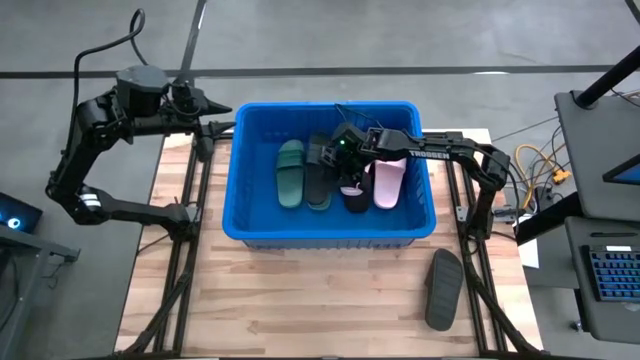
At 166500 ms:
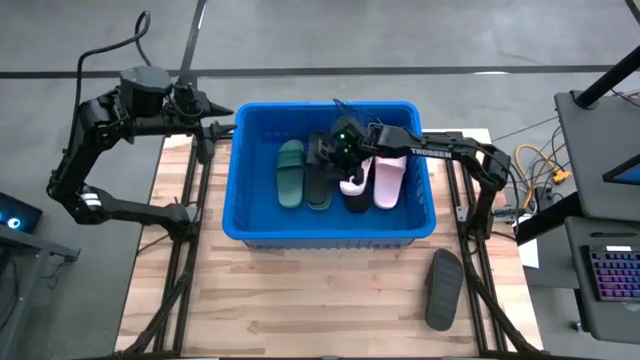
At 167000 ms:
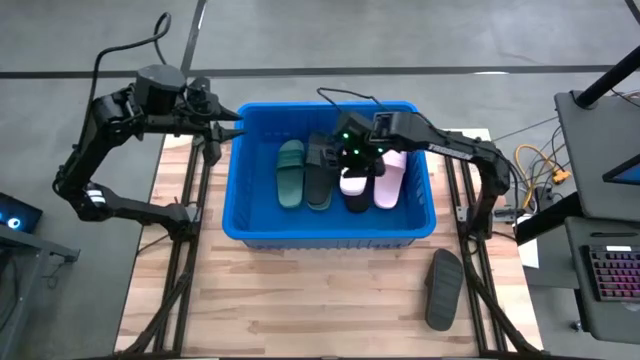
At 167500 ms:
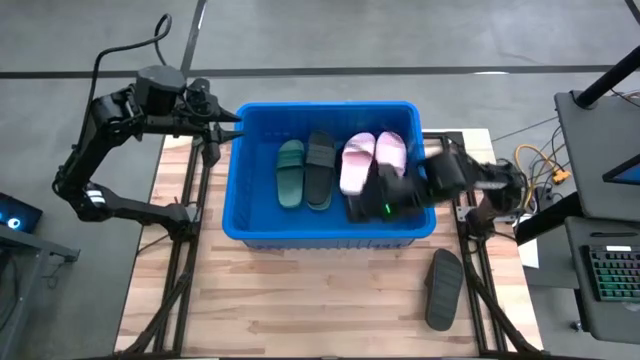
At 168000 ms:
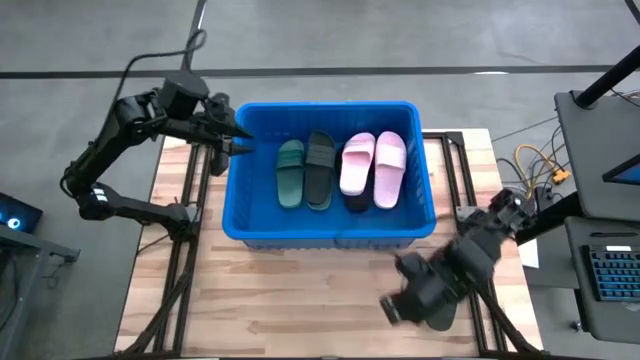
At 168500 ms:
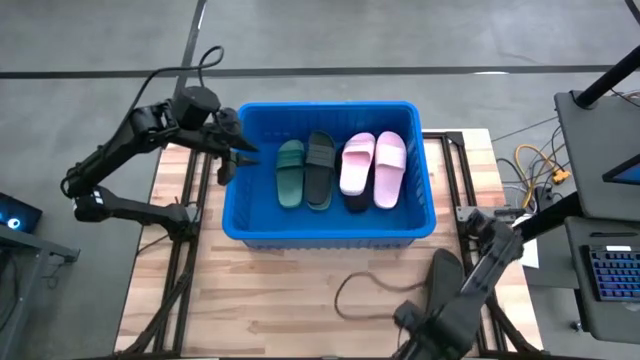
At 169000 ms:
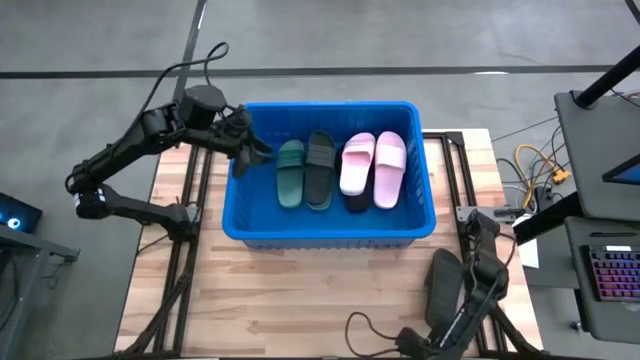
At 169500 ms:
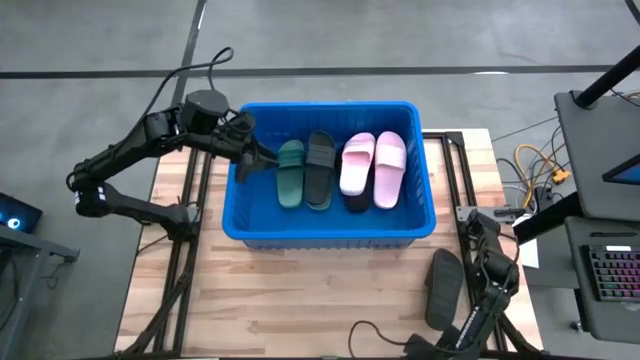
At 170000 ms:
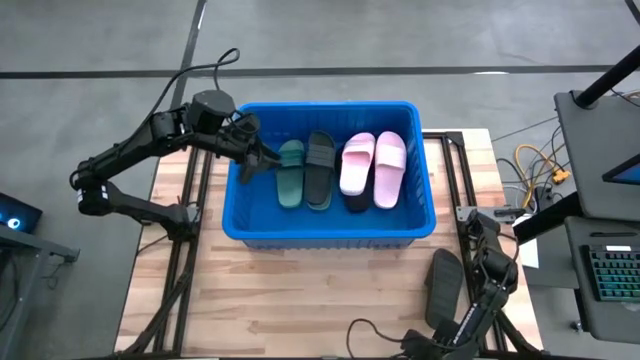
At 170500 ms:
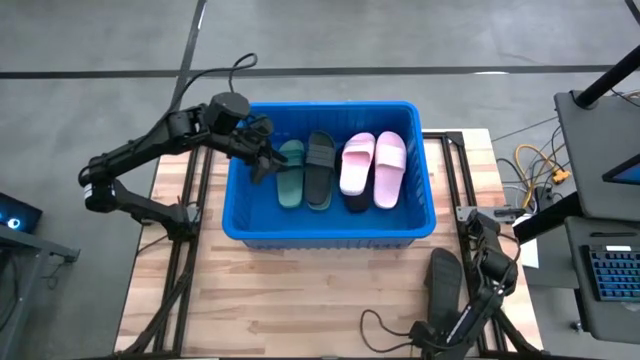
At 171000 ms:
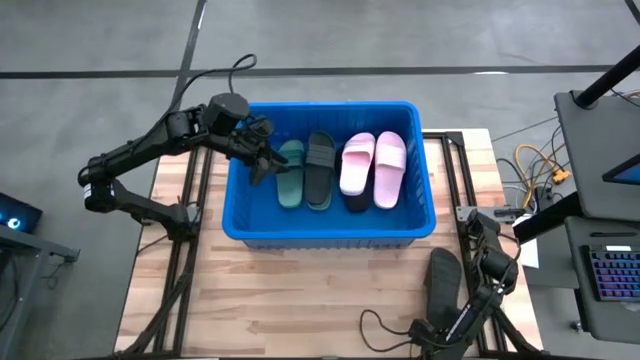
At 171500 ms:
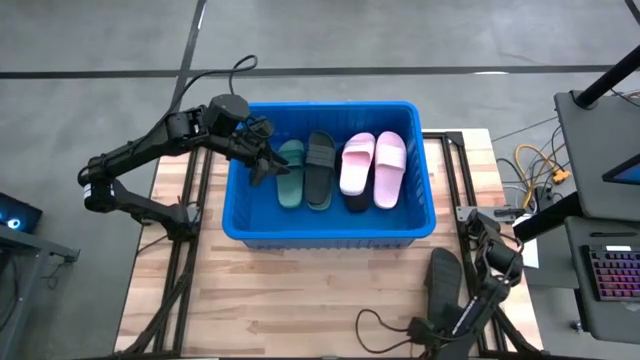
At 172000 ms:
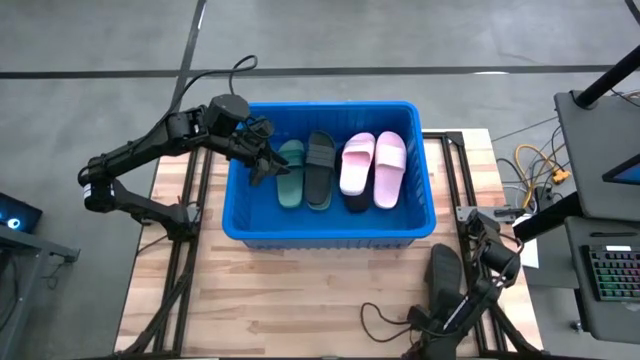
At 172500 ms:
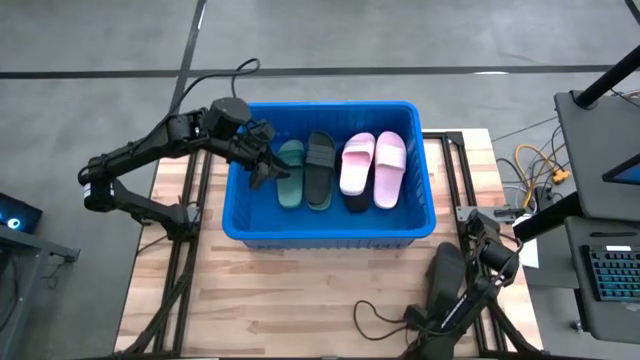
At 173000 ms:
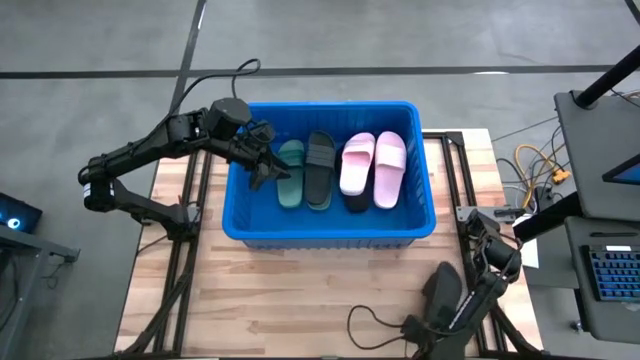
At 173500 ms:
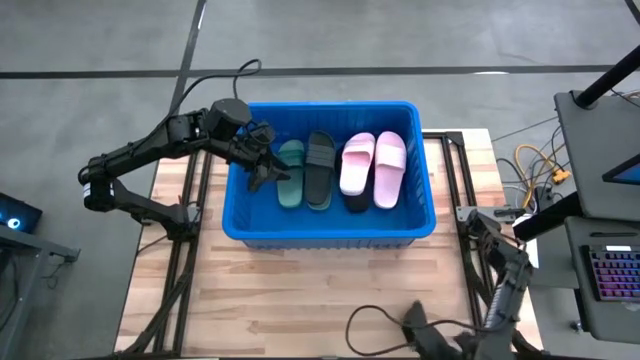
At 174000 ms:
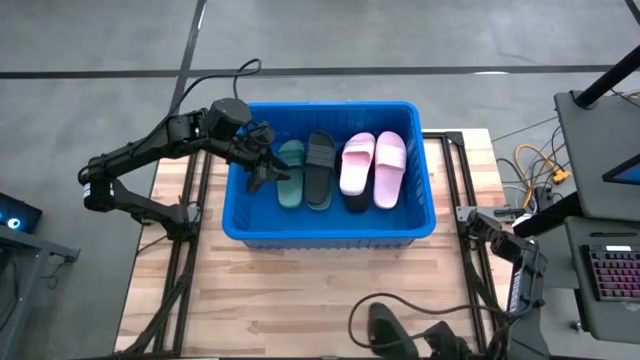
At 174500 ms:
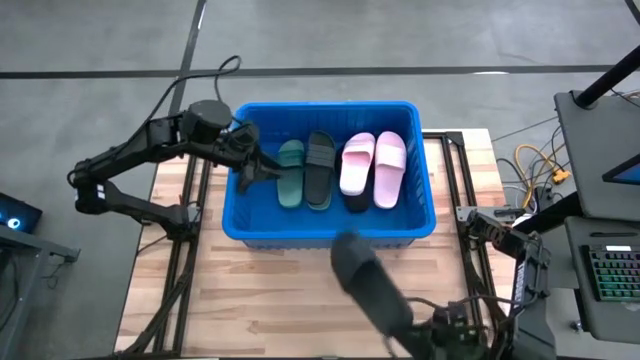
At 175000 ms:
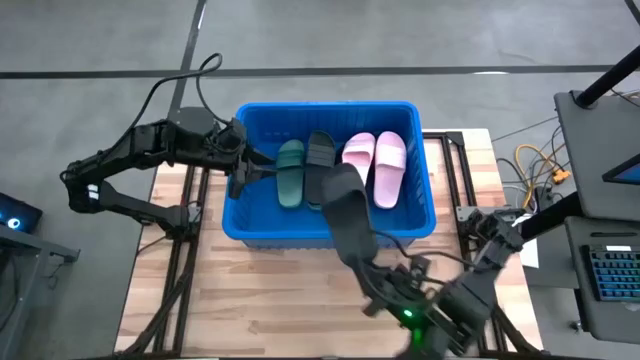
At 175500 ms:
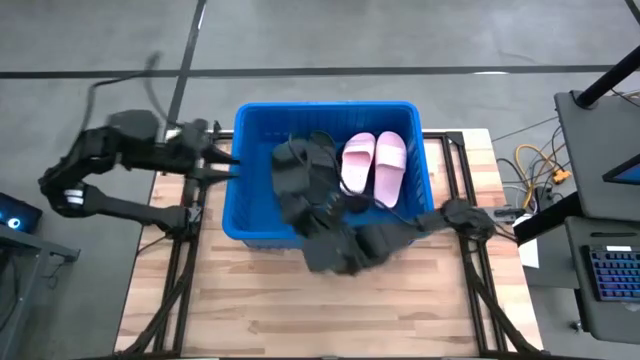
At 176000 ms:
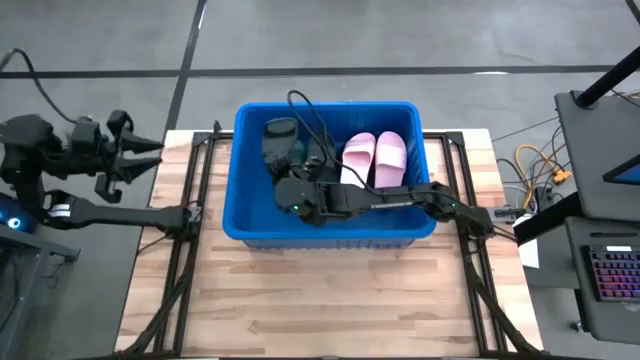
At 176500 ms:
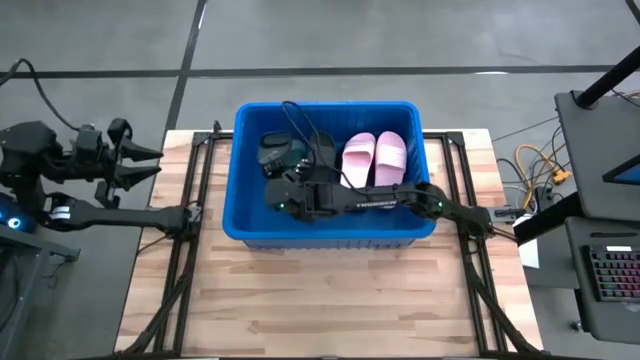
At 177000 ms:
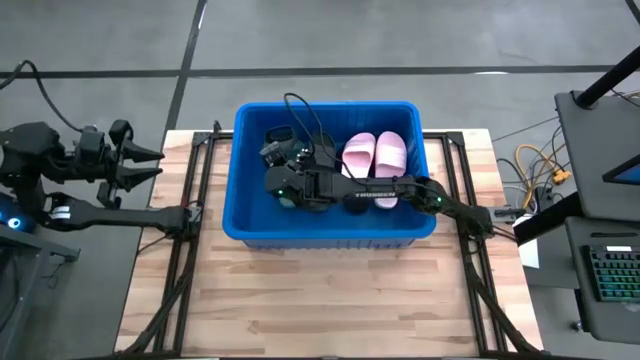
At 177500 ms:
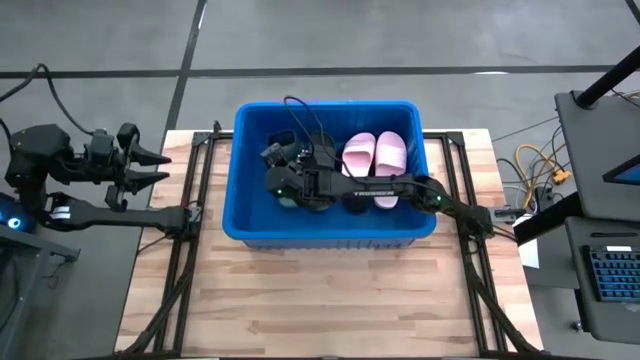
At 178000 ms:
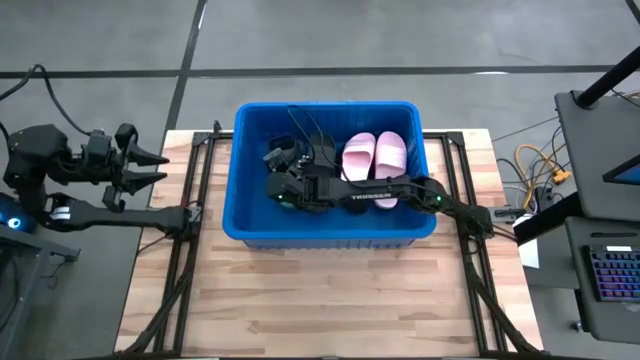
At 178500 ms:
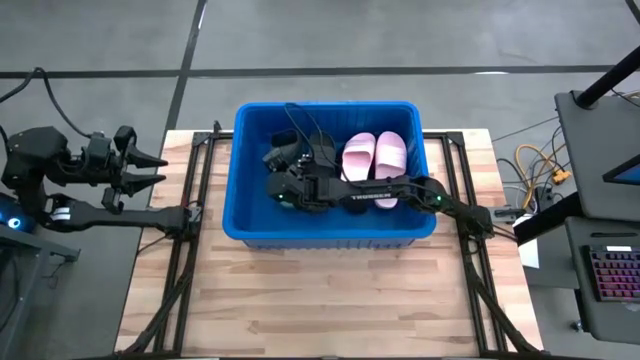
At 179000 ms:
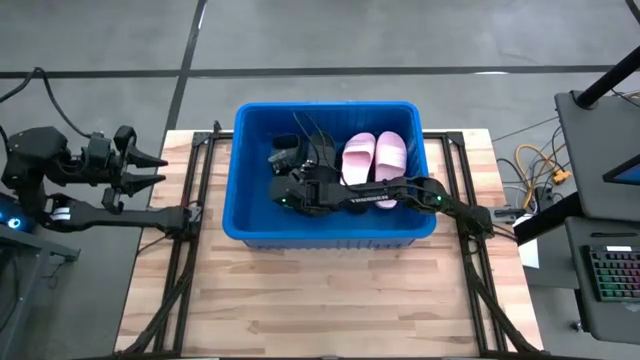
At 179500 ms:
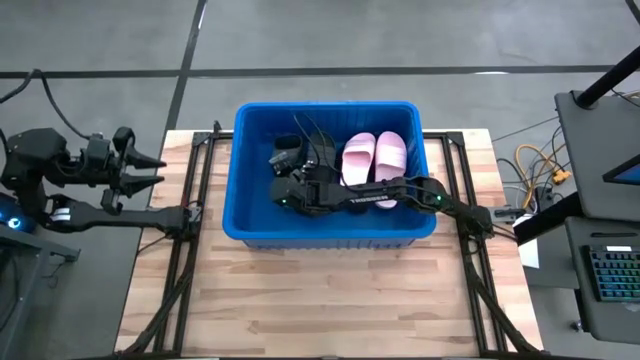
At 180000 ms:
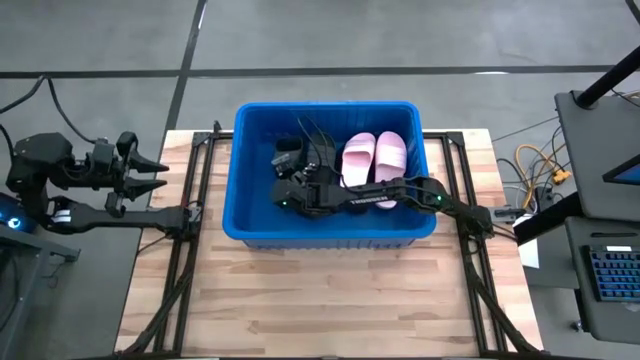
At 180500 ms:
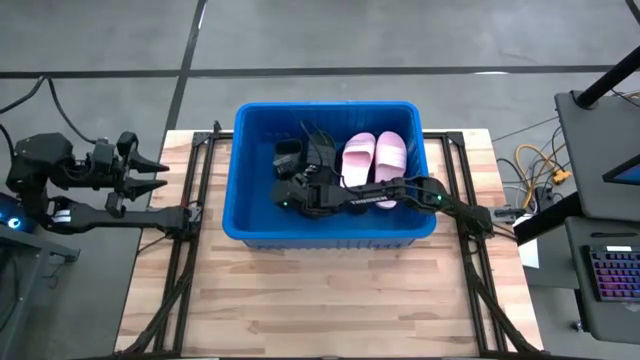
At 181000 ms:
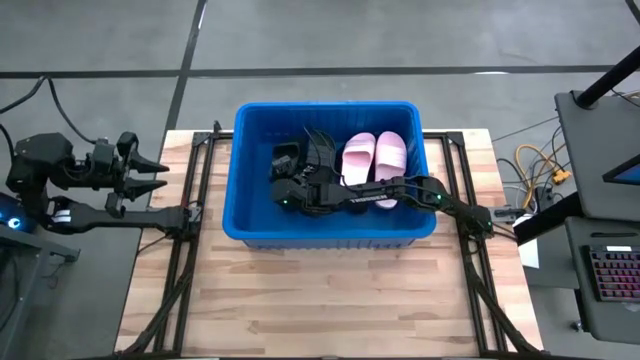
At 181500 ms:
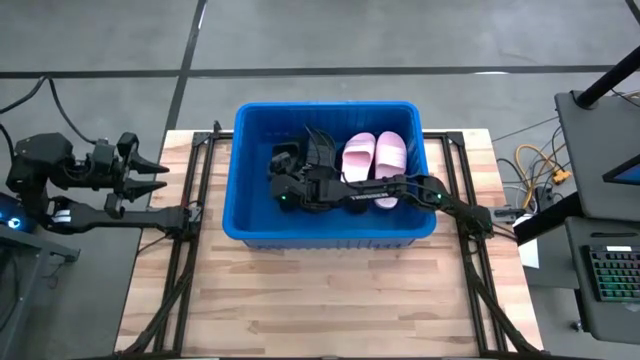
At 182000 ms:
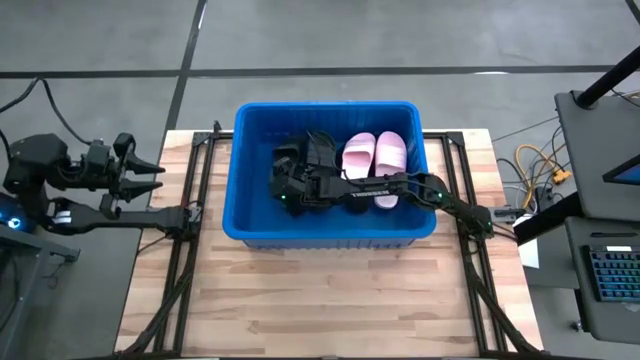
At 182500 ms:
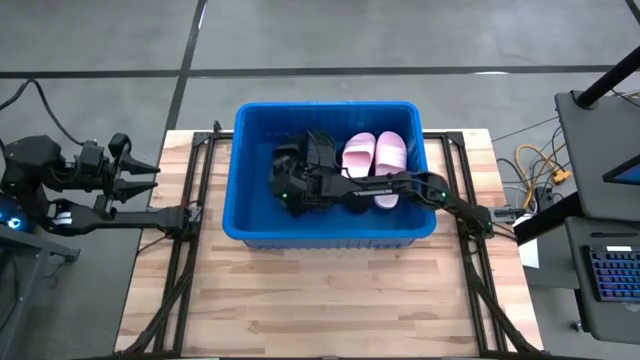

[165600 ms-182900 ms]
Task: Pick and place slides into bin
Put the black slide into the bin

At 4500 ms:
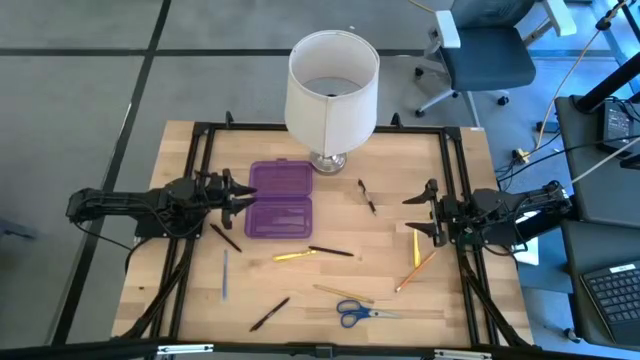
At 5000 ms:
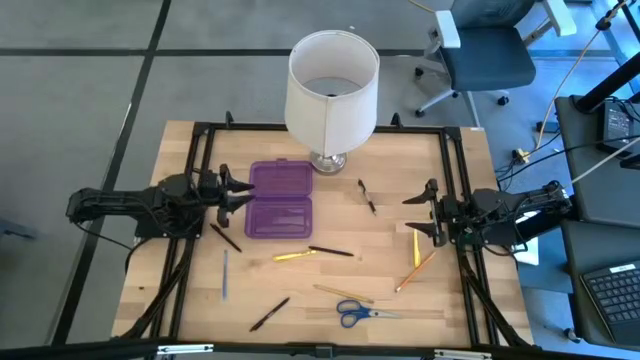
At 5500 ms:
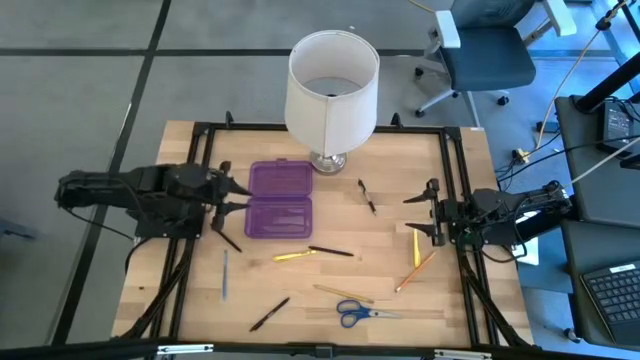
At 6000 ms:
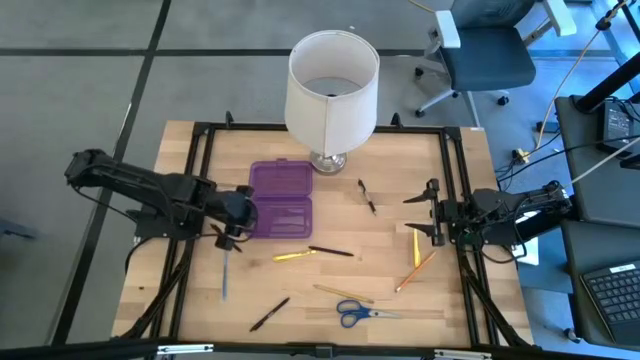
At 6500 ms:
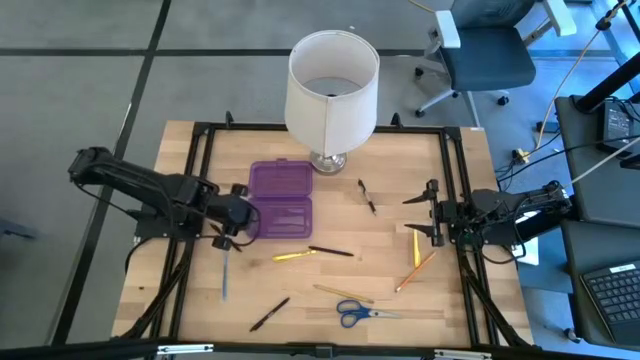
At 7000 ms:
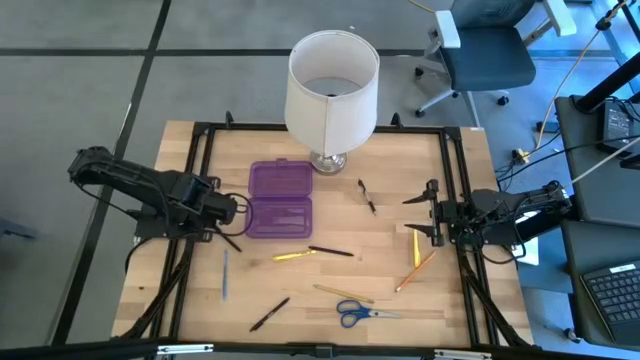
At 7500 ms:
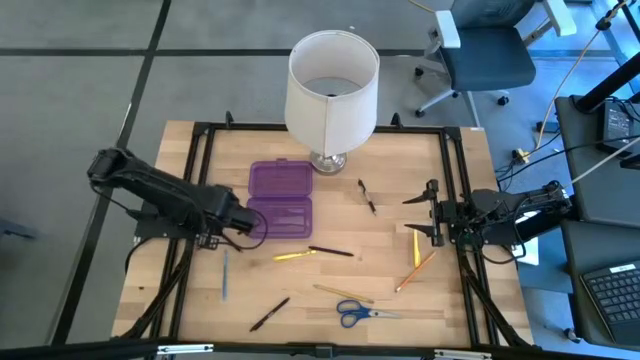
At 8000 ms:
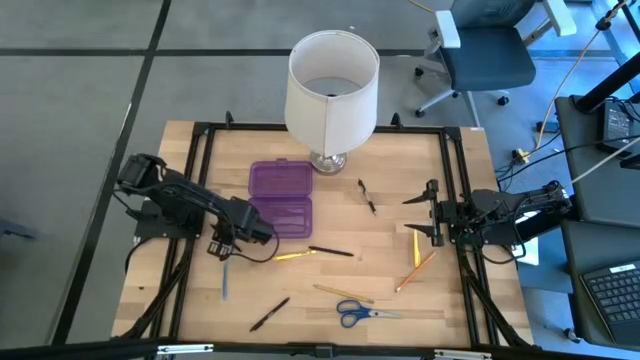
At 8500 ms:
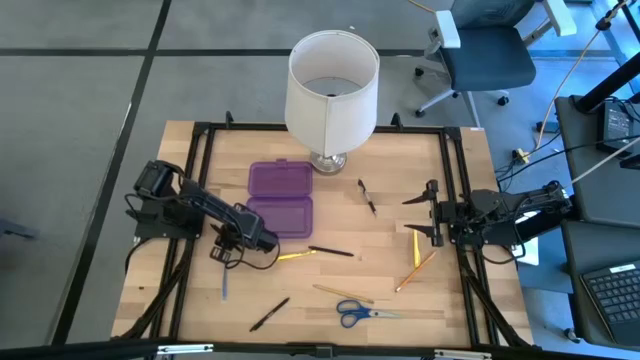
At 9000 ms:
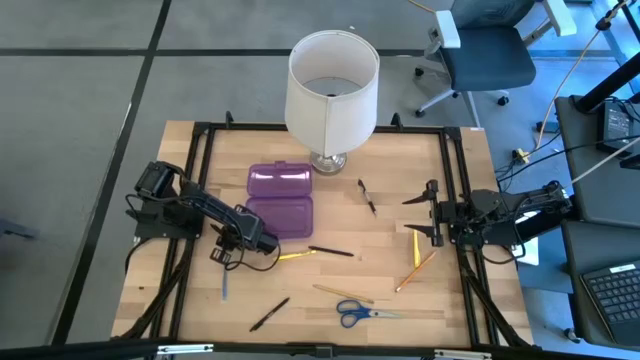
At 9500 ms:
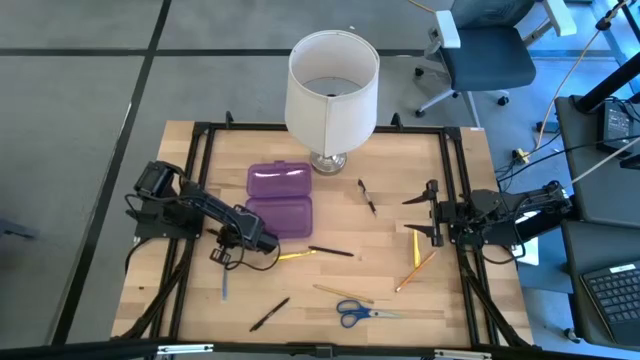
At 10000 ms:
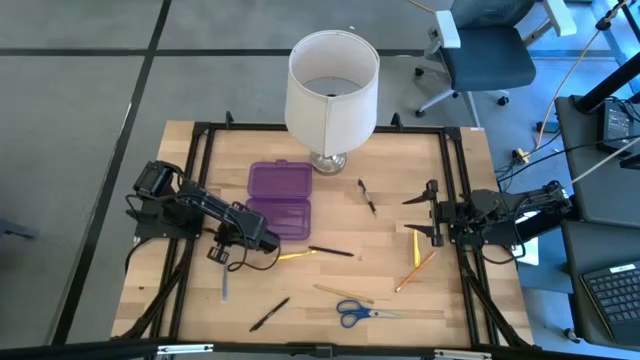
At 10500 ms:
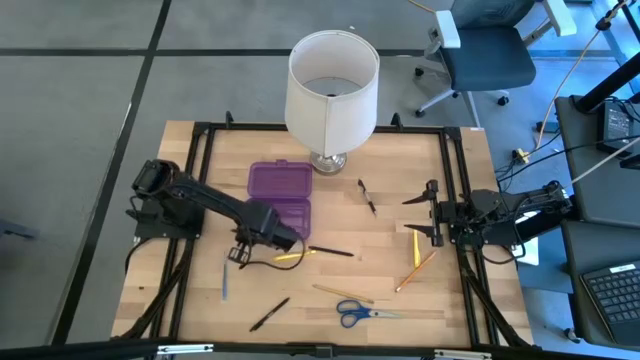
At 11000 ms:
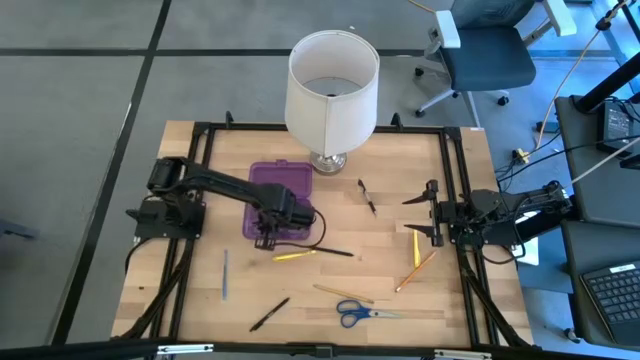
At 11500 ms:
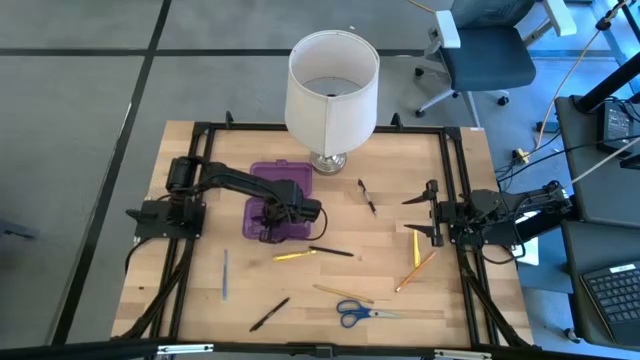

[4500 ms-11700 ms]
Task: Pick & place school supplies into a supply box
Put the top left black pen into the purple supply box
